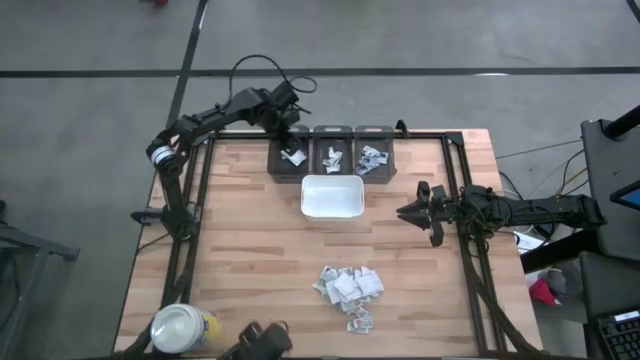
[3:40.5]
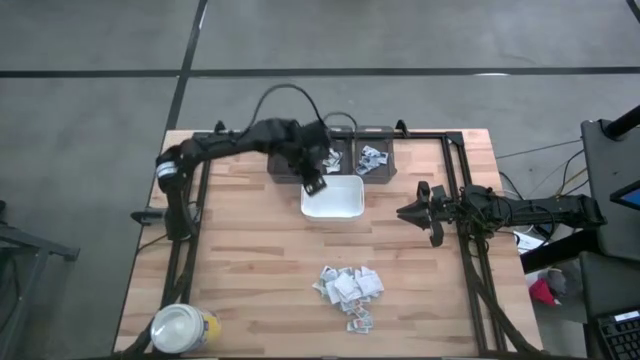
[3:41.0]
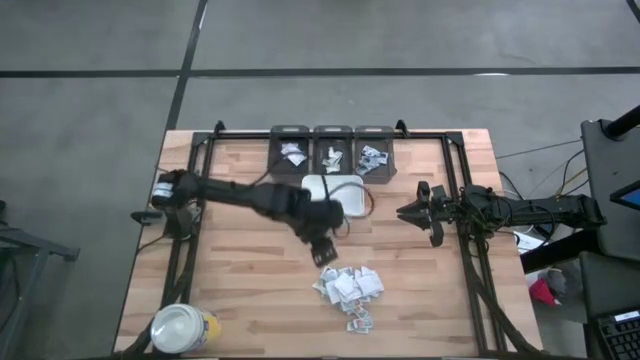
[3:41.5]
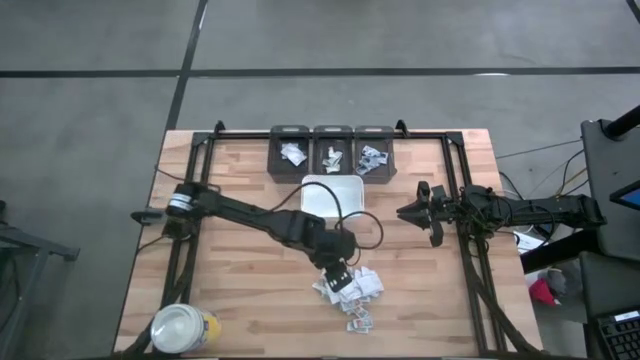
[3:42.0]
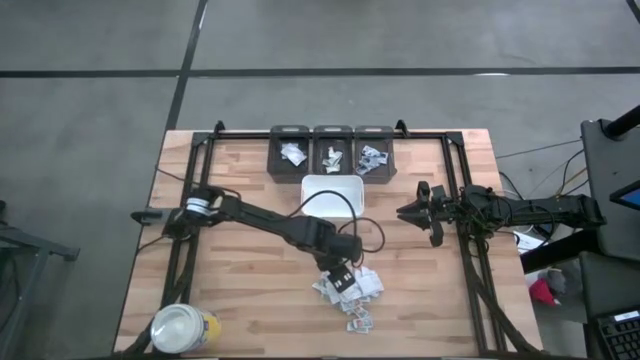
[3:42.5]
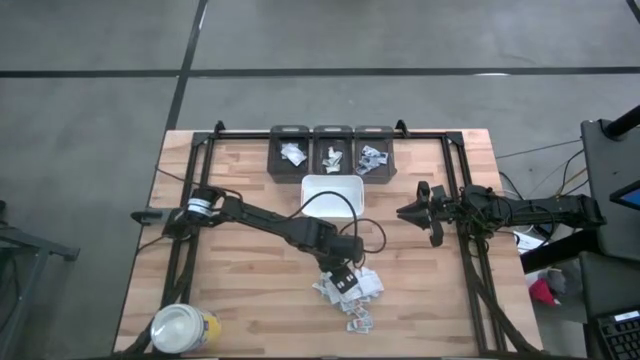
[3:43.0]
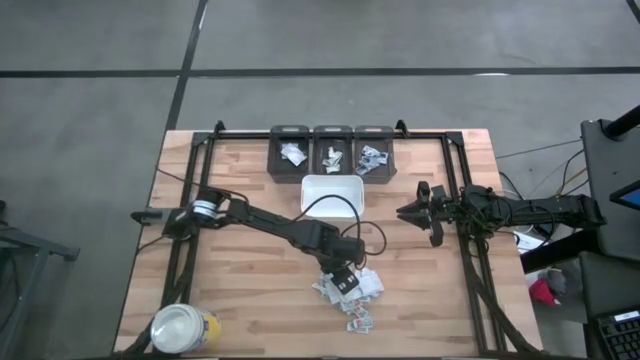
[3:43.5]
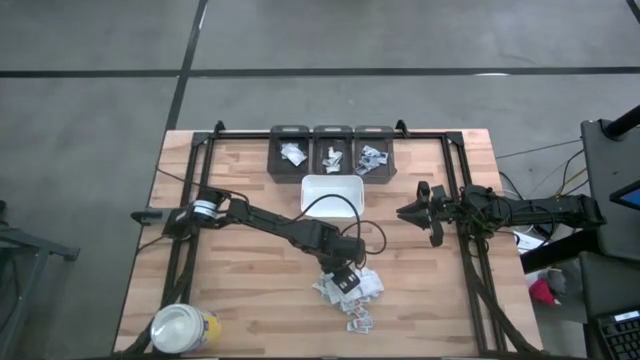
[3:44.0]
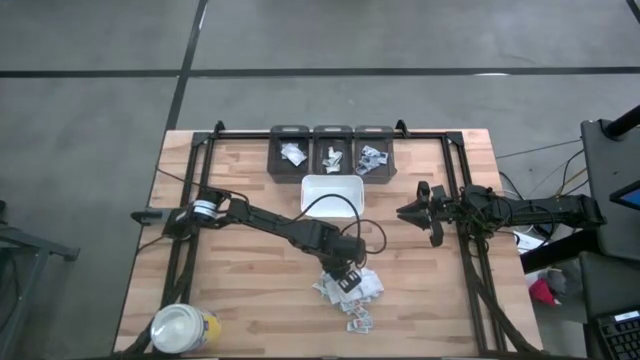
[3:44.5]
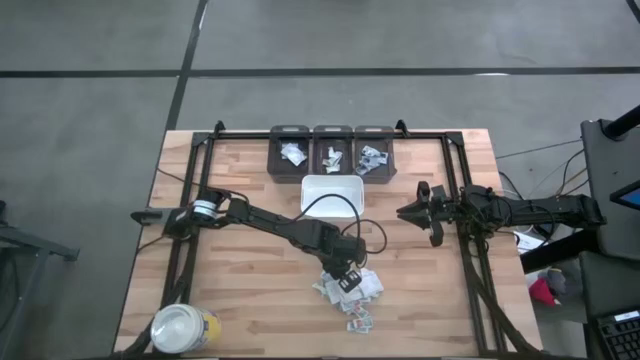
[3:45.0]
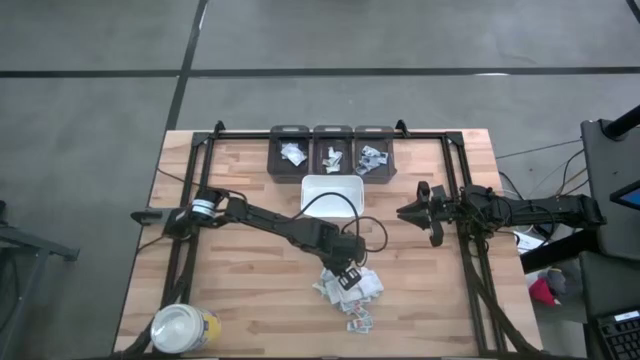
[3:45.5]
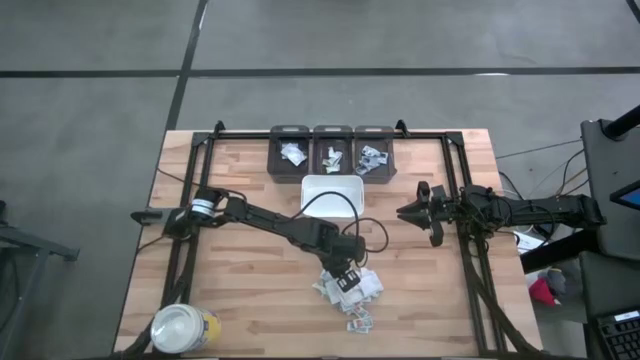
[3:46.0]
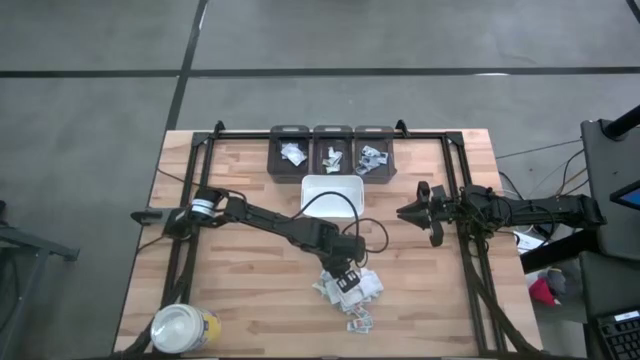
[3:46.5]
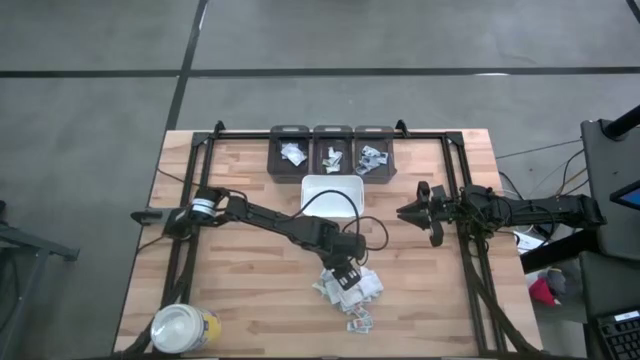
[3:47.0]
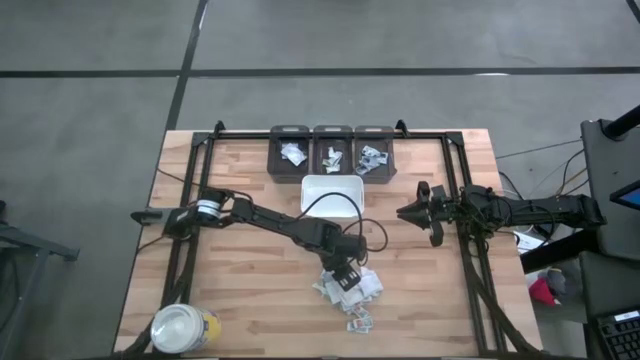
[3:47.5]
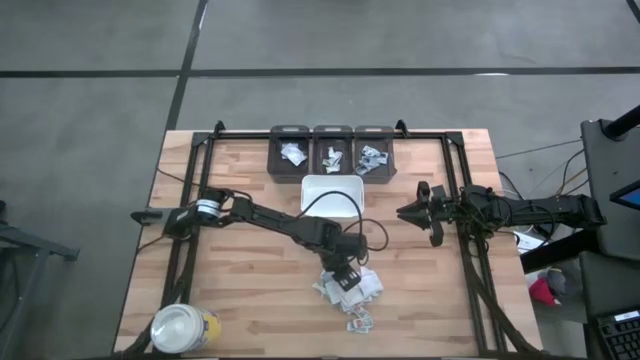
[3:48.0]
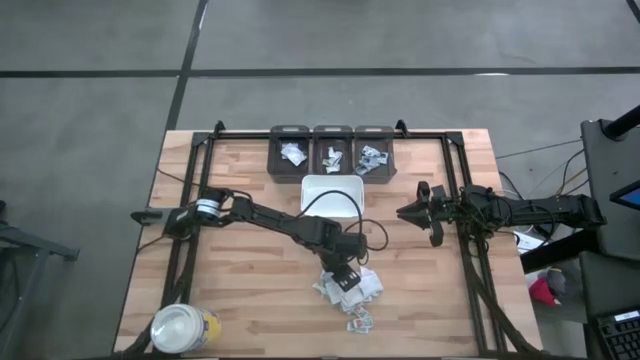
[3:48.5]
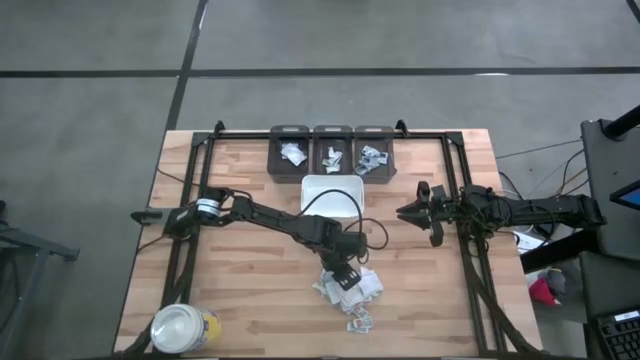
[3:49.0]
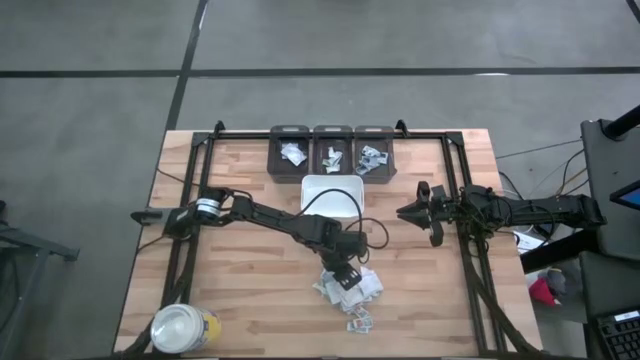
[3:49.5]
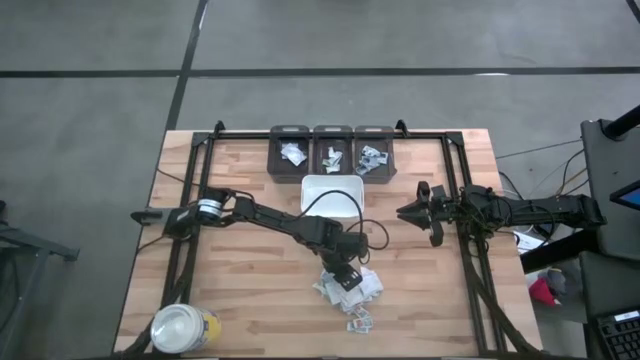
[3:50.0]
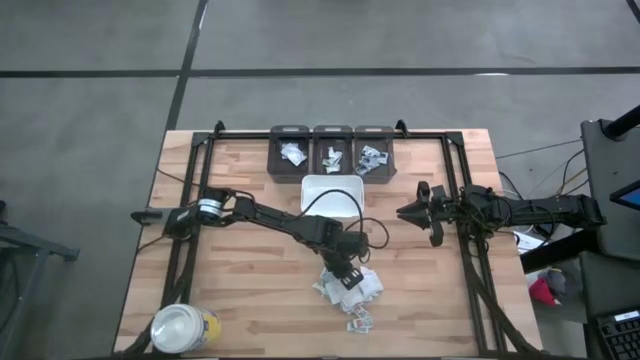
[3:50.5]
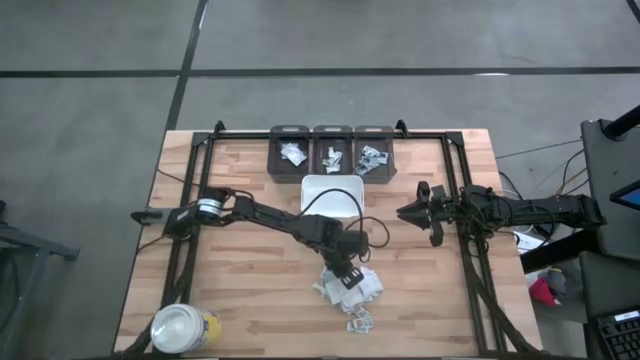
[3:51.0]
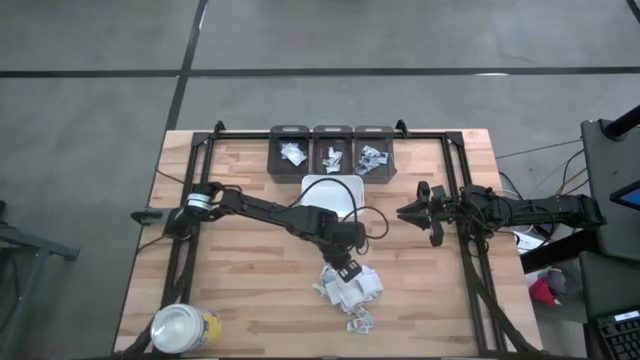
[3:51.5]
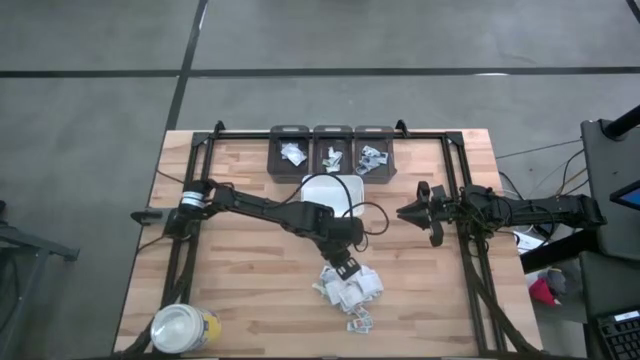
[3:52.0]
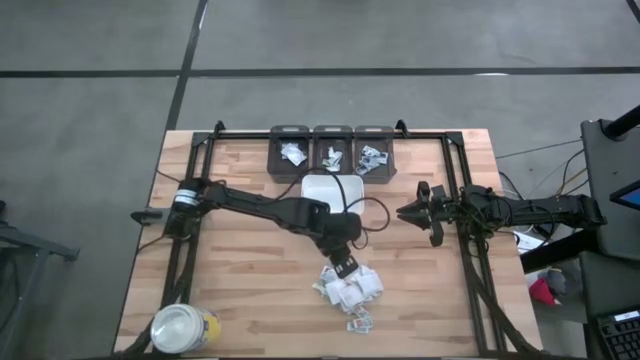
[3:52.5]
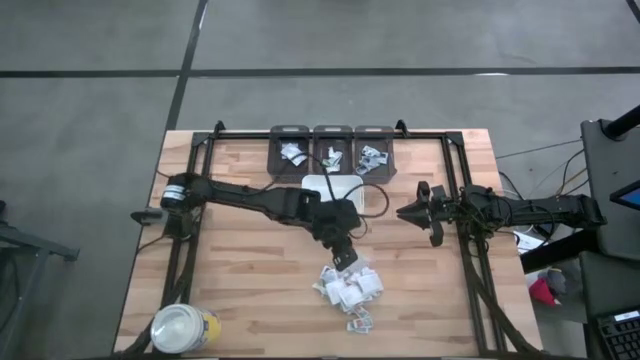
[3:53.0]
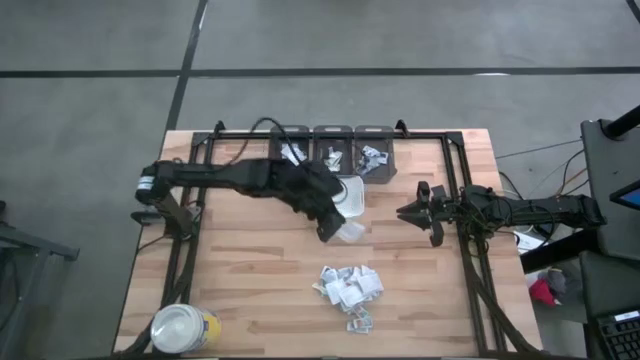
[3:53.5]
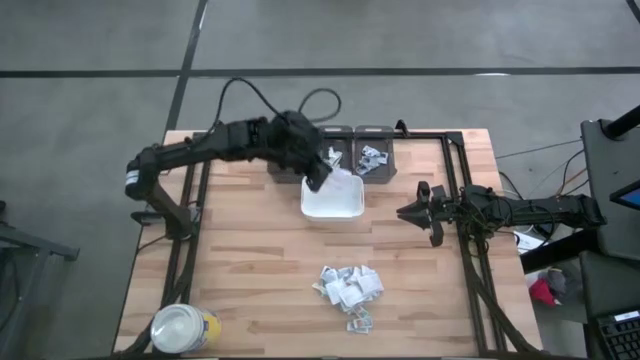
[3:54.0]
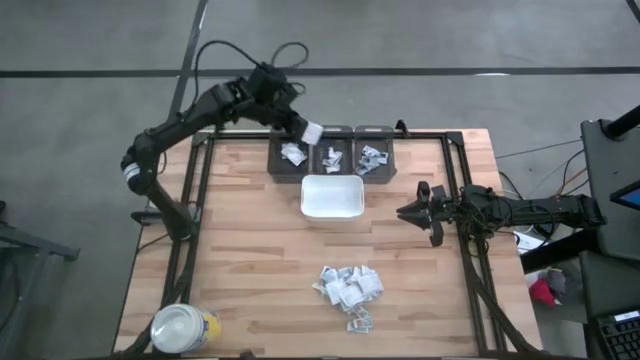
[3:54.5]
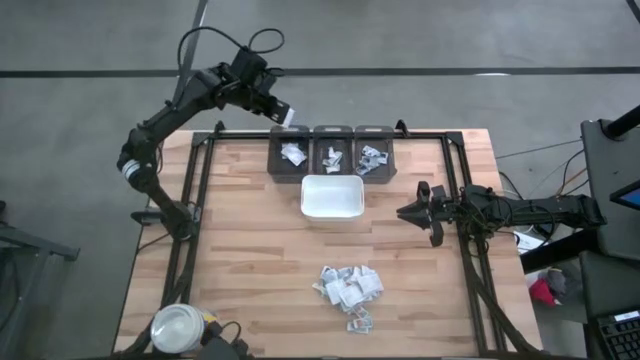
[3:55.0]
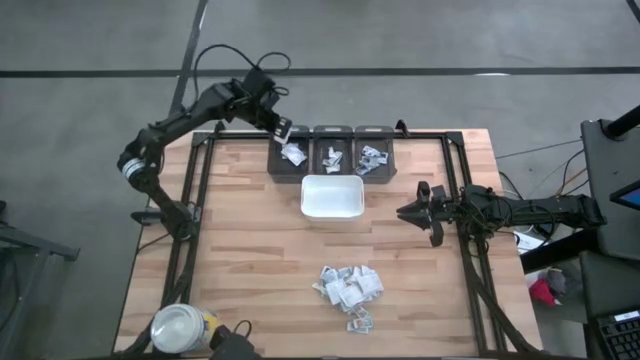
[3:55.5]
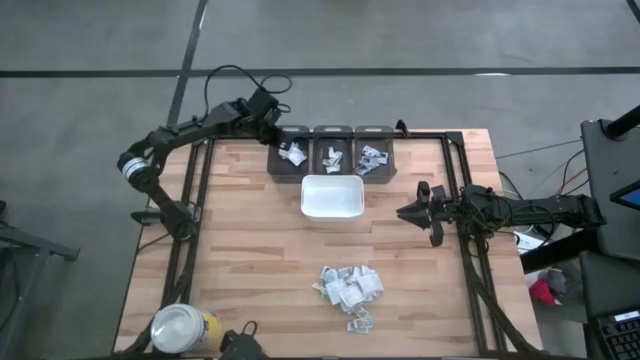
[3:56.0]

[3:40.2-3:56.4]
Task: Pick & Place First Aid Supplies
Put the white fingertip band aid into the left black bin

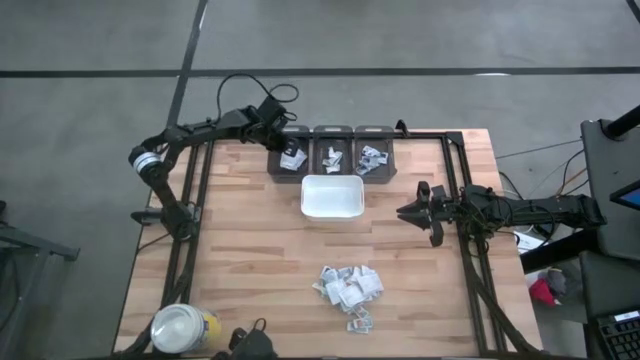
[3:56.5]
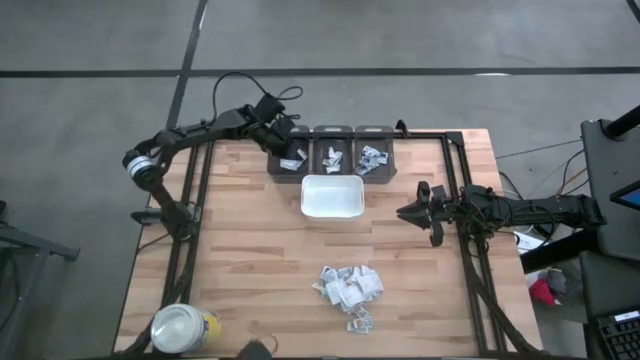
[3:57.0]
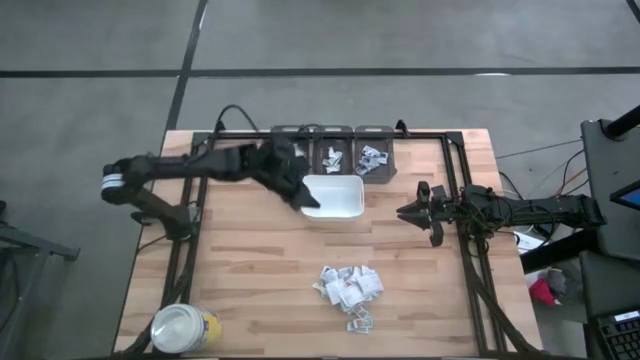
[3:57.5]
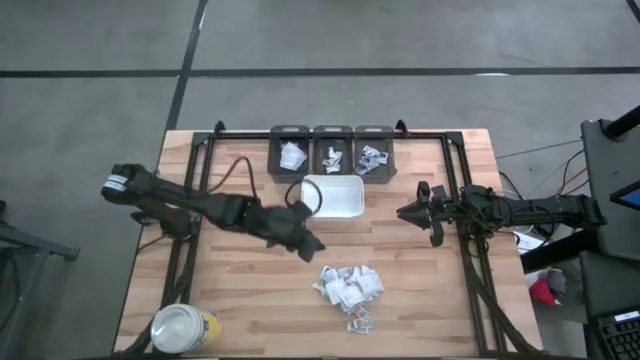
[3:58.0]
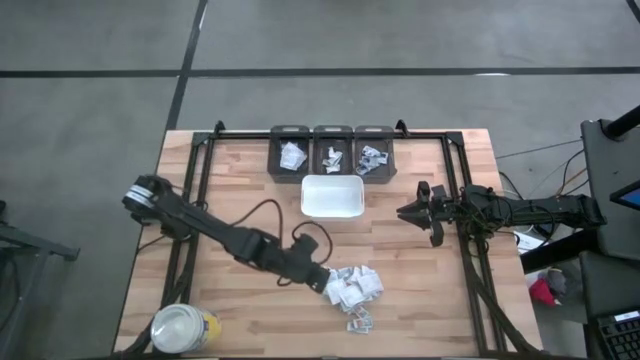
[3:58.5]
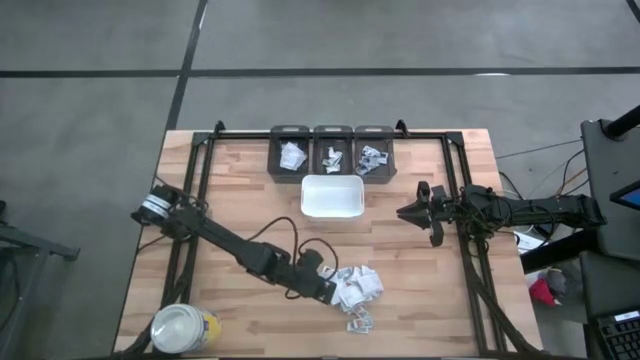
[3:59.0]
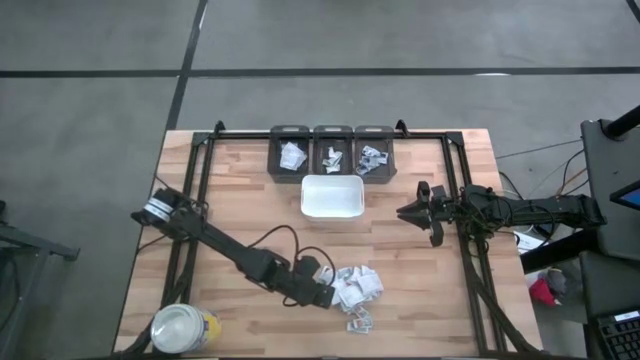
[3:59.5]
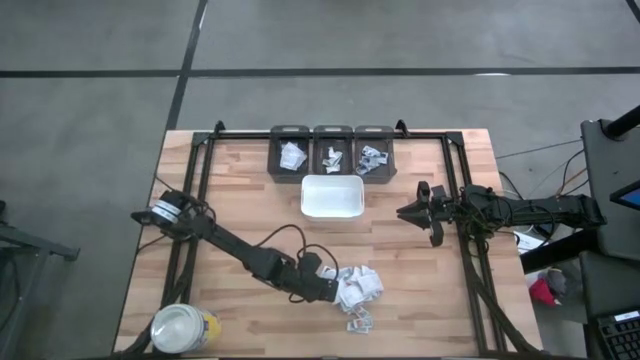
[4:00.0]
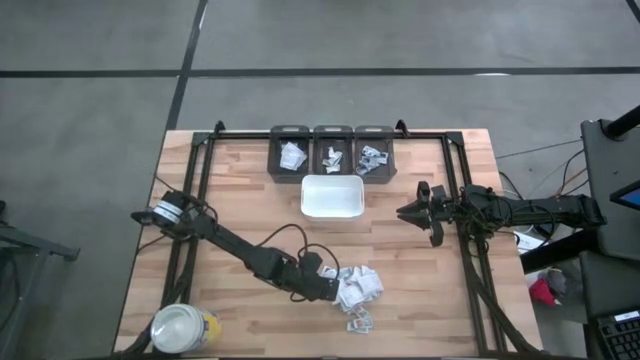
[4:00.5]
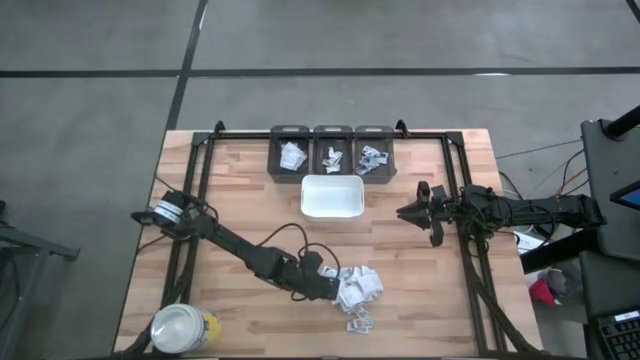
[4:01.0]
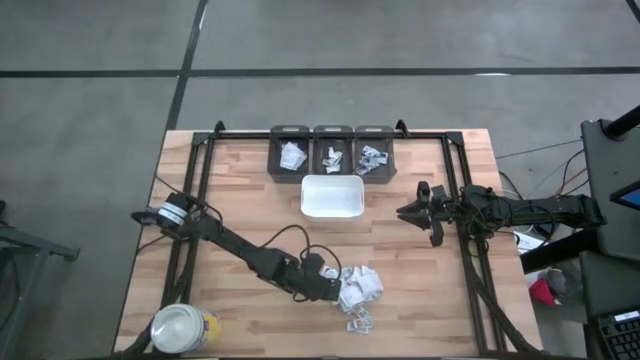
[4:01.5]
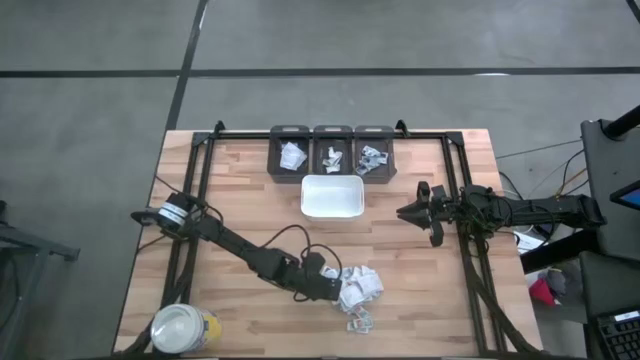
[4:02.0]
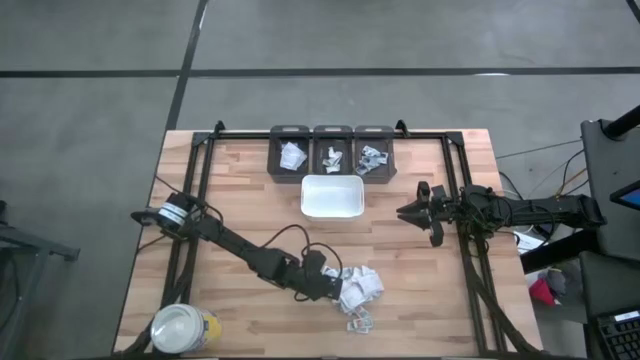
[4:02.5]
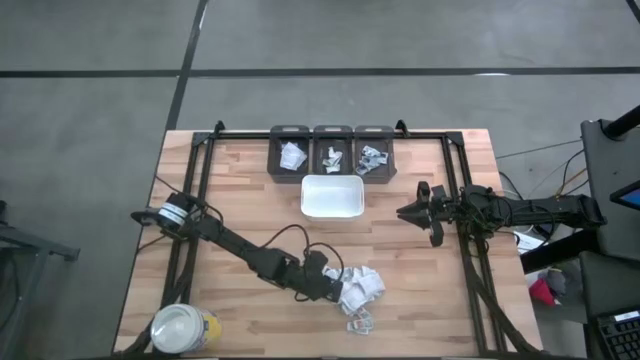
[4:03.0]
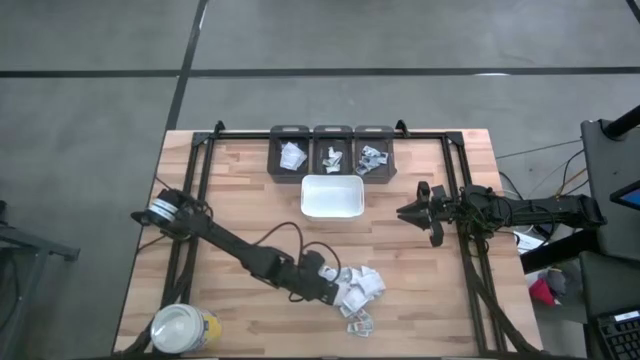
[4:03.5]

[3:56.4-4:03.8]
Put the white fingertip band aid into the left black bin
